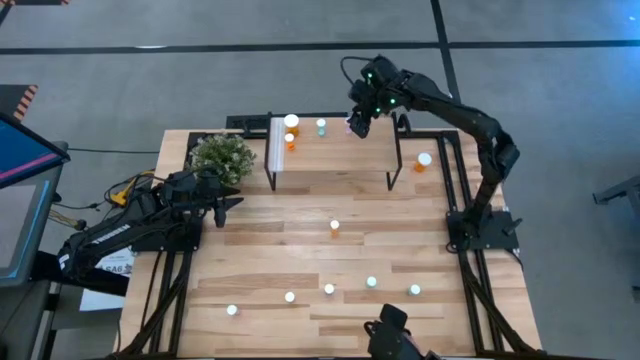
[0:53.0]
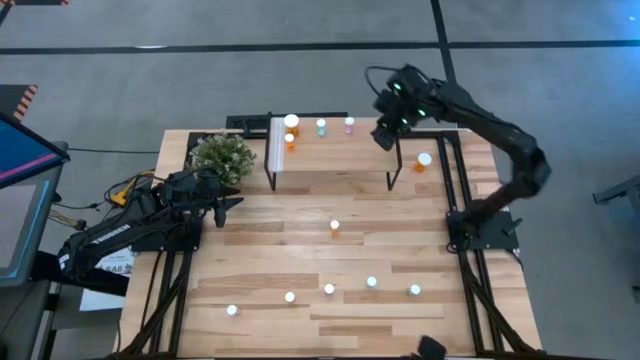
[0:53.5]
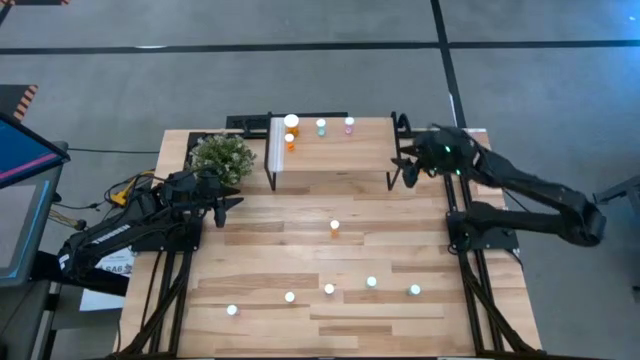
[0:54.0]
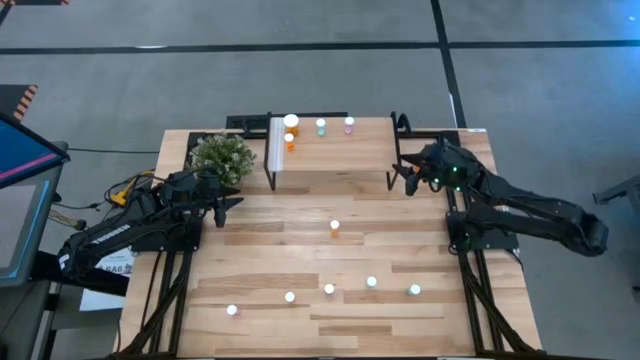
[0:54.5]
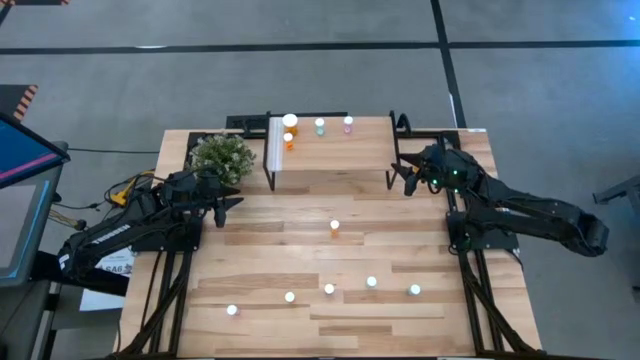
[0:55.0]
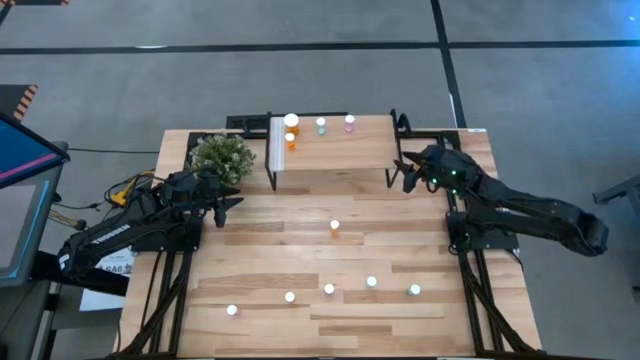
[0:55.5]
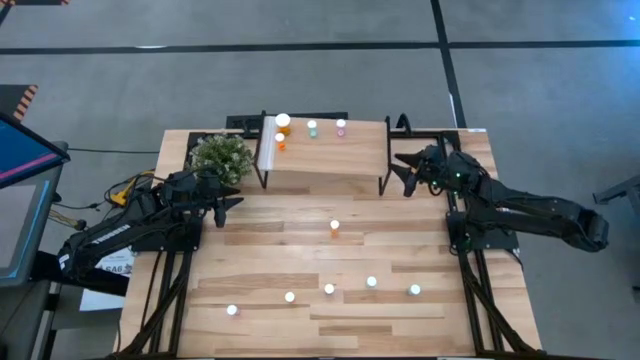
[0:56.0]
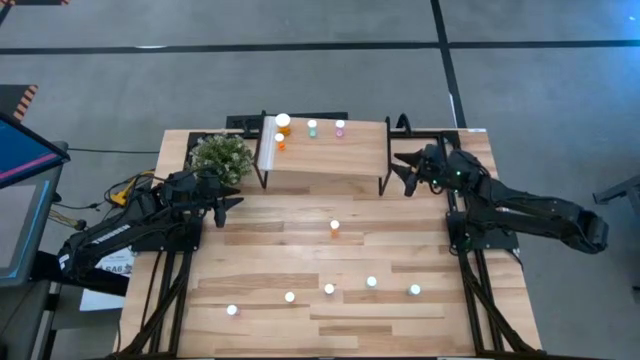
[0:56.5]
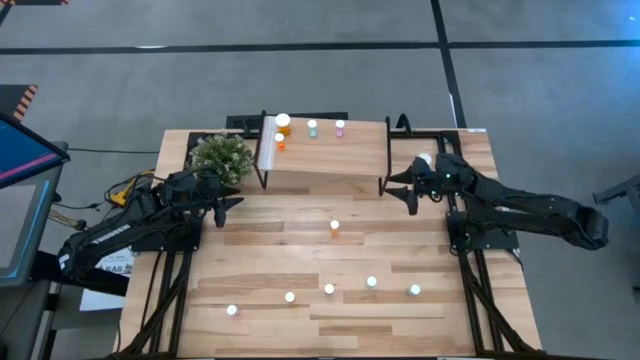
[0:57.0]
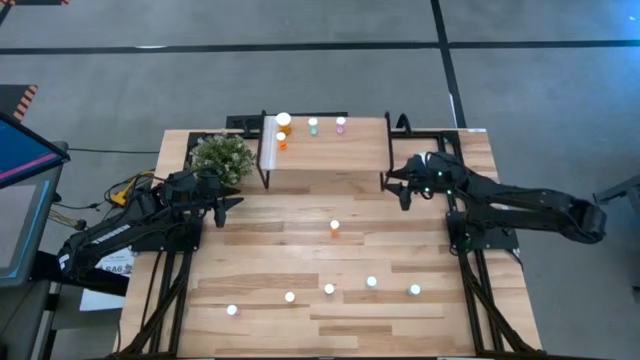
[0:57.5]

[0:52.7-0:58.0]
Task: Pick and place medicine bottles onto shelf by color
Adjust the shelf

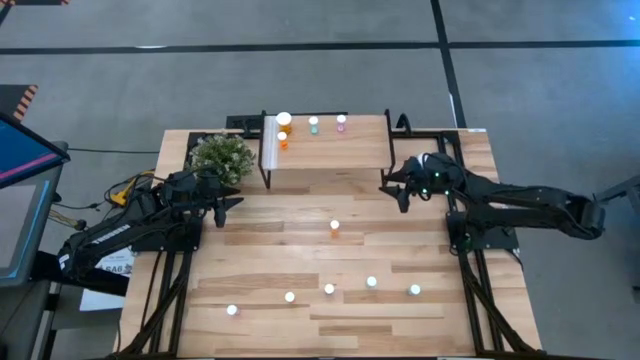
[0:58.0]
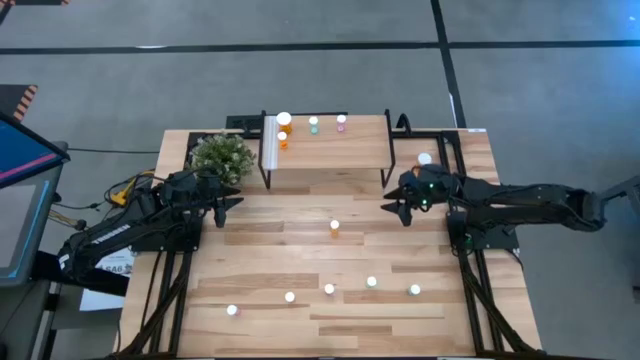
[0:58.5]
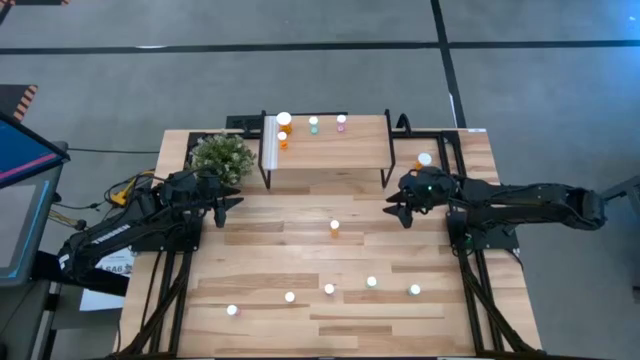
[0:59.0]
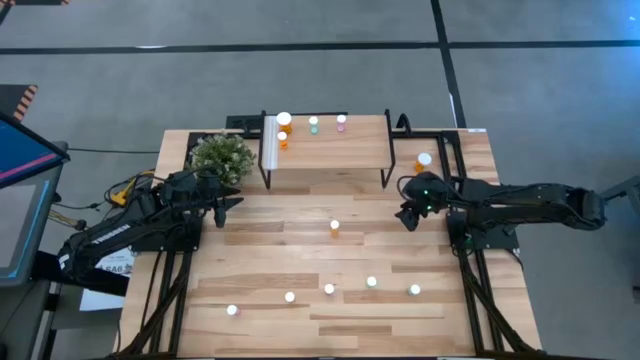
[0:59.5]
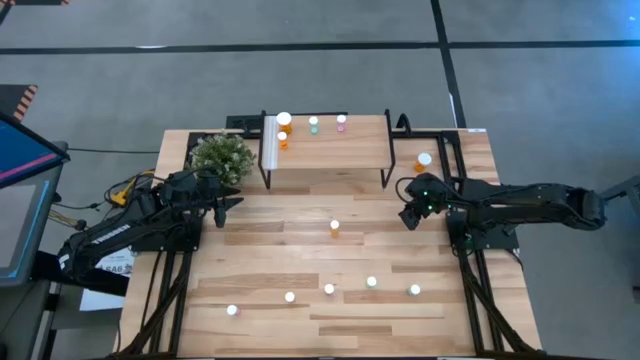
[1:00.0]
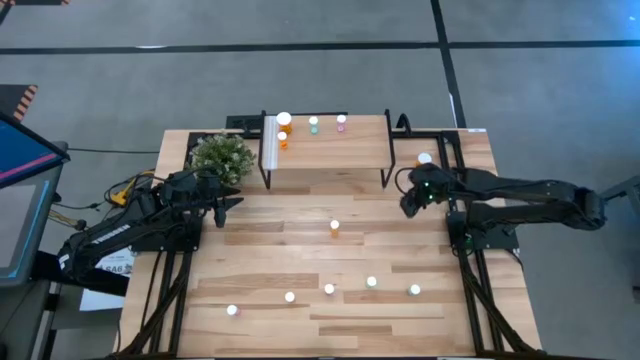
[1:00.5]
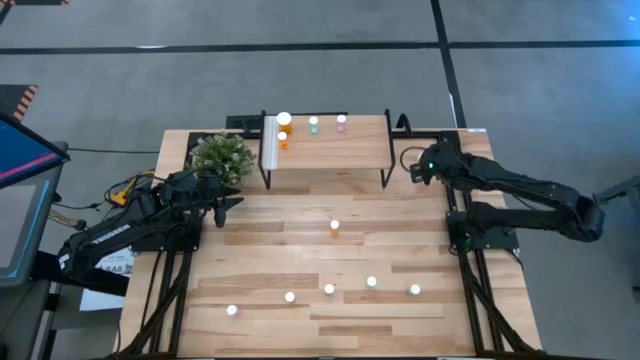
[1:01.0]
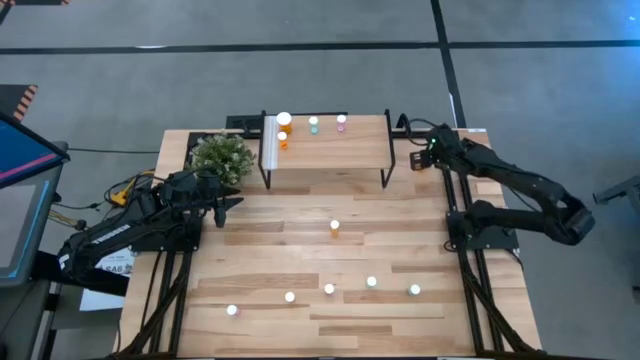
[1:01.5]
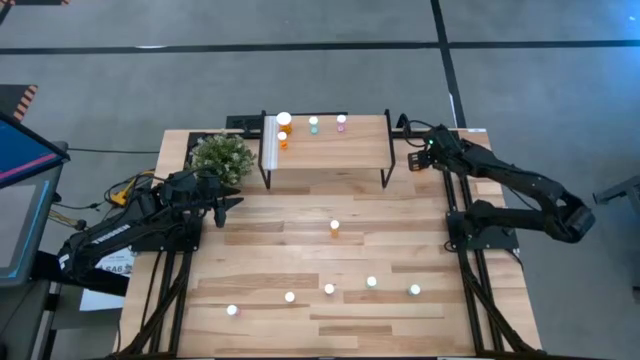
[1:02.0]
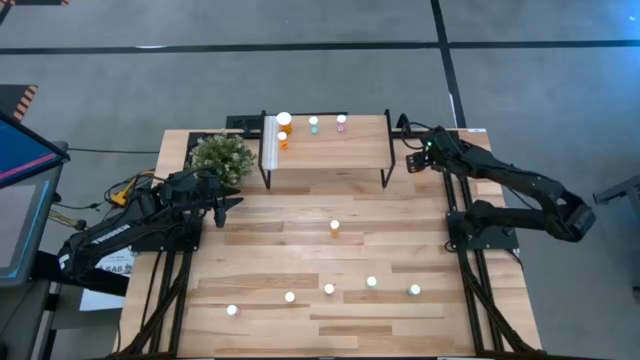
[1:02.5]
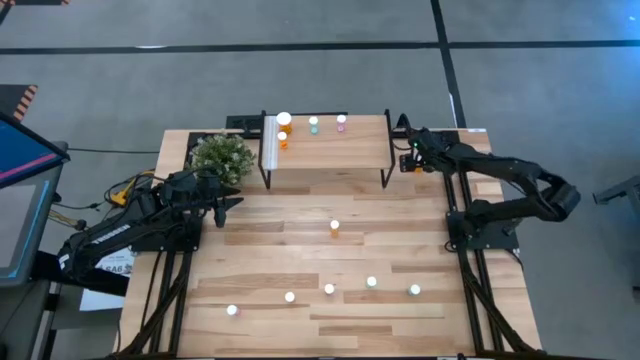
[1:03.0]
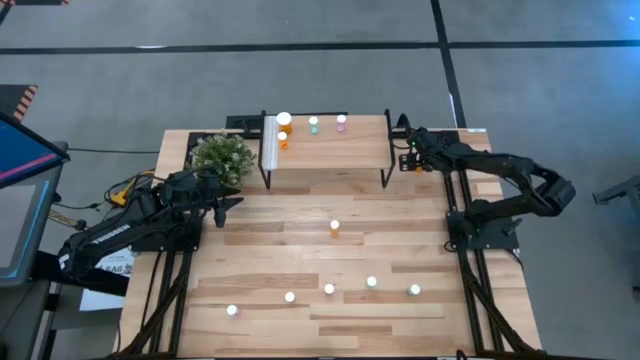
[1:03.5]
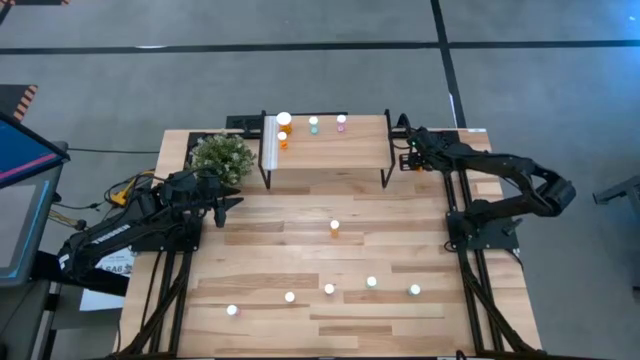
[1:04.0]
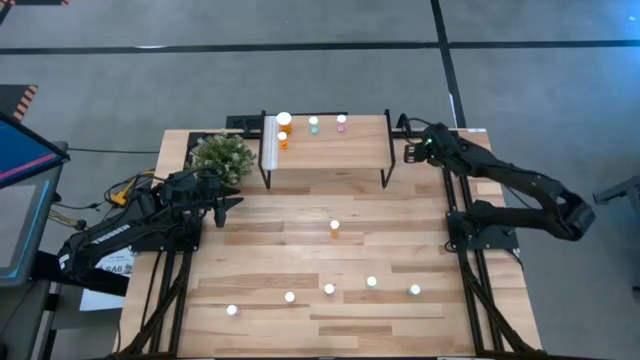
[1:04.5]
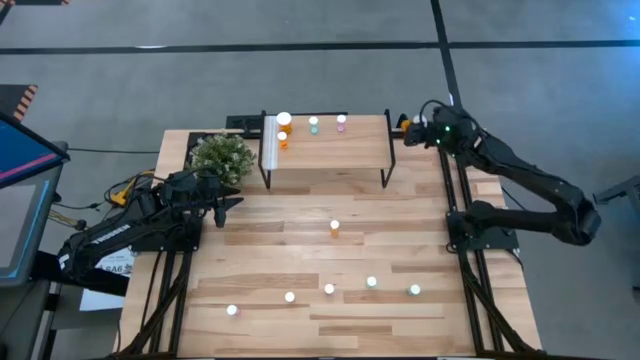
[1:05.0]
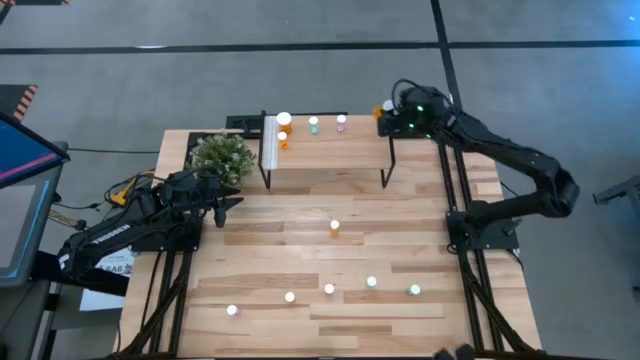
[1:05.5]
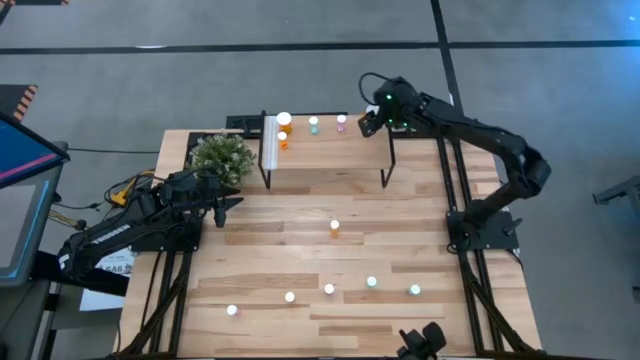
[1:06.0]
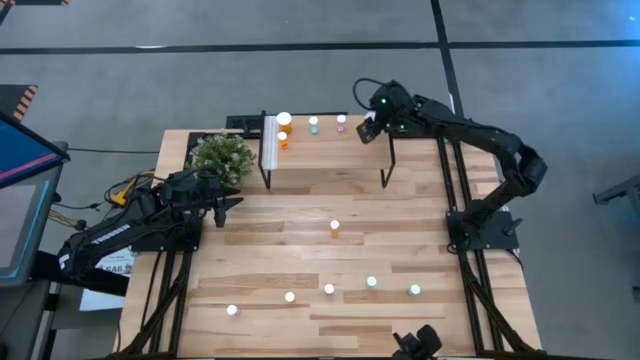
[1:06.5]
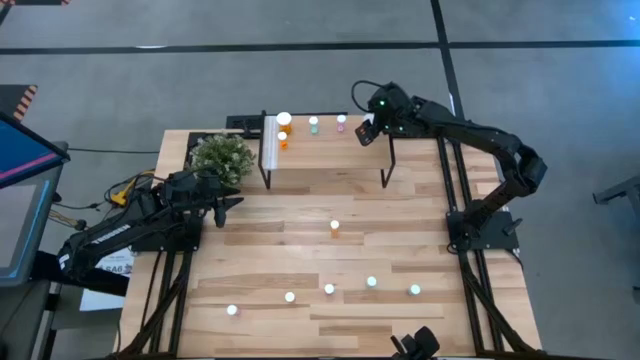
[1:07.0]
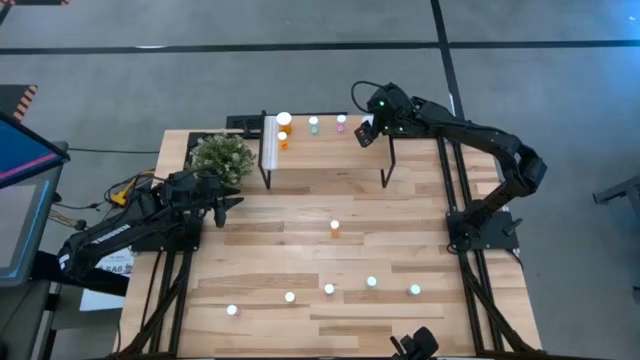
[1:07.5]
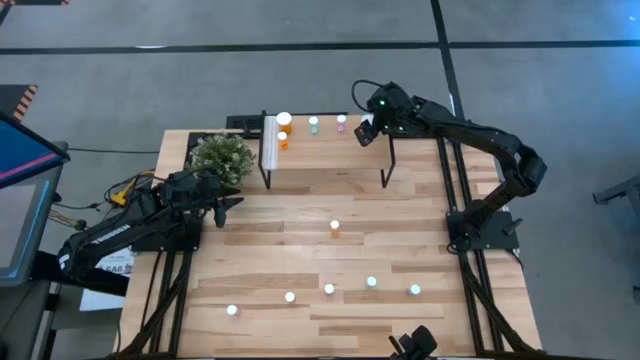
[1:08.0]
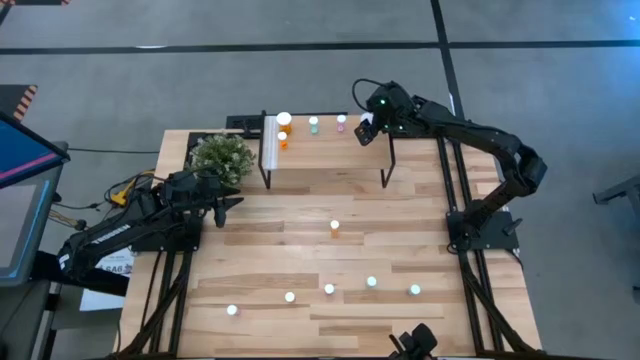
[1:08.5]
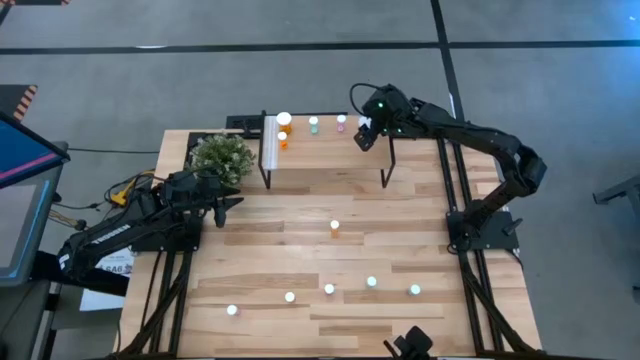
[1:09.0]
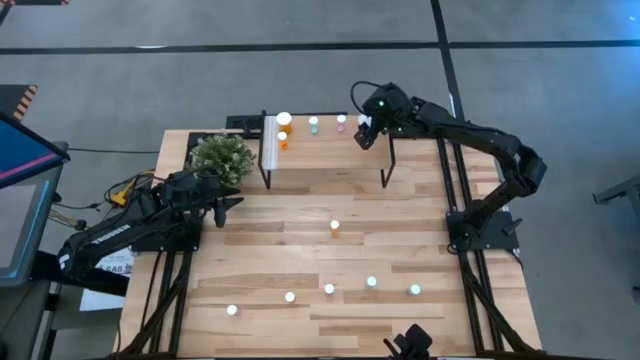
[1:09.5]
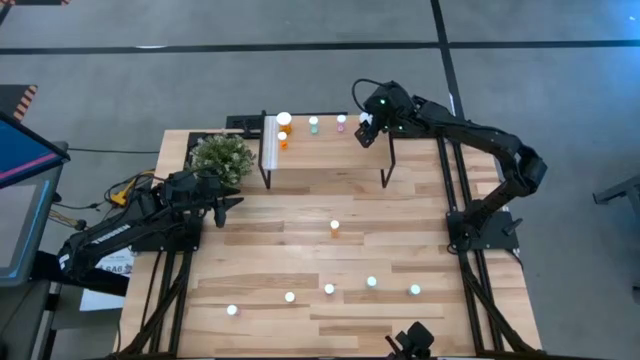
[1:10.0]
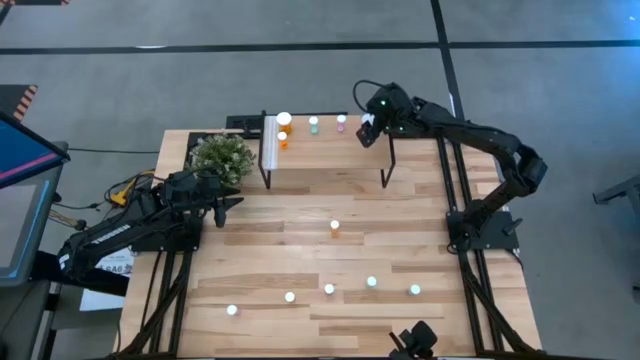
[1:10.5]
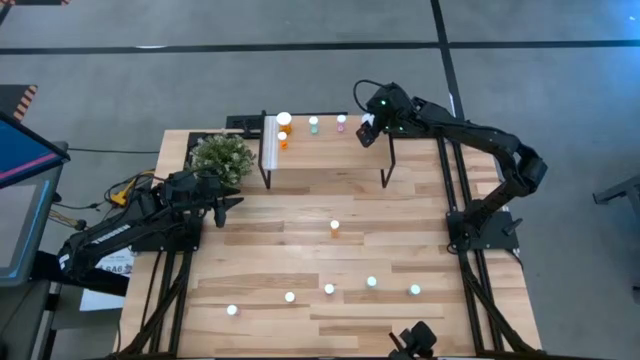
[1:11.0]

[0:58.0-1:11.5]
Put the big orange pill bottle on the shelf

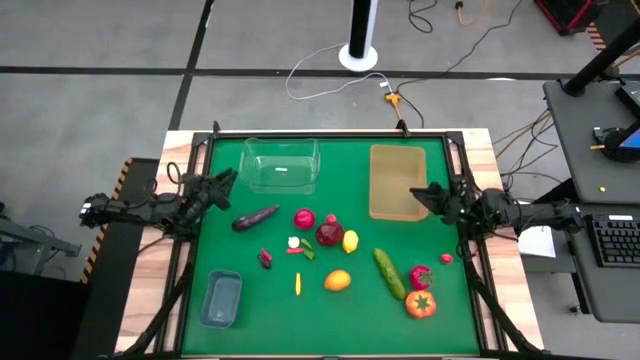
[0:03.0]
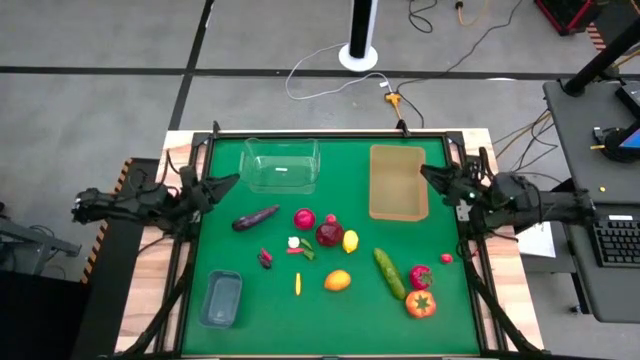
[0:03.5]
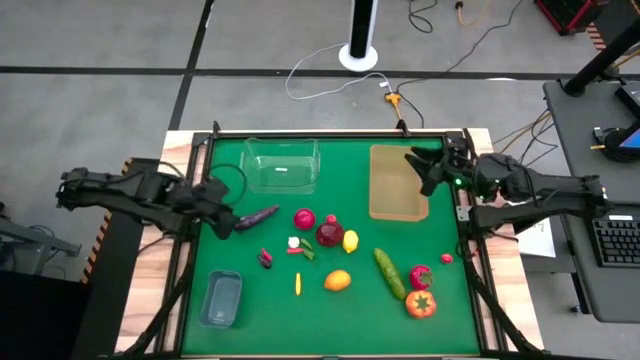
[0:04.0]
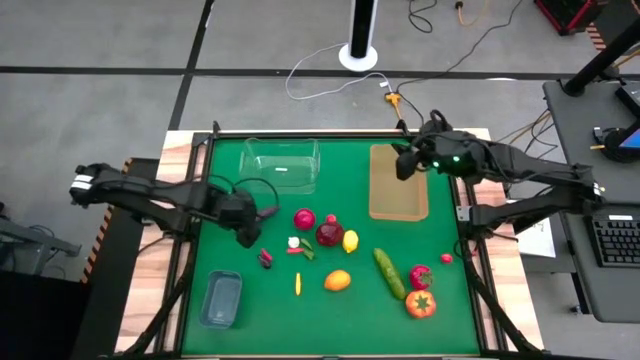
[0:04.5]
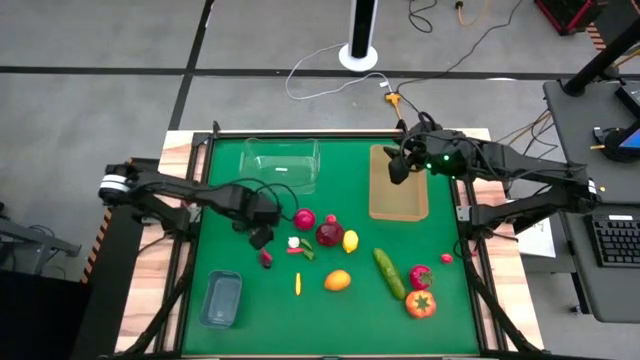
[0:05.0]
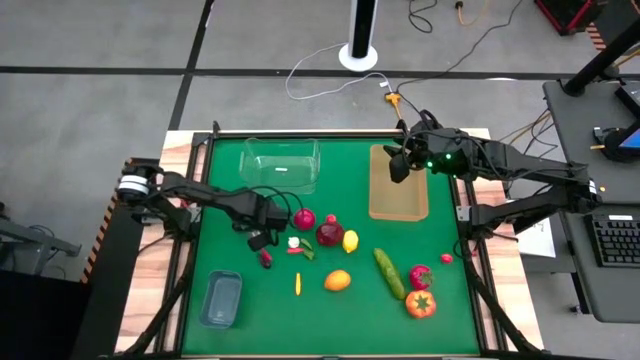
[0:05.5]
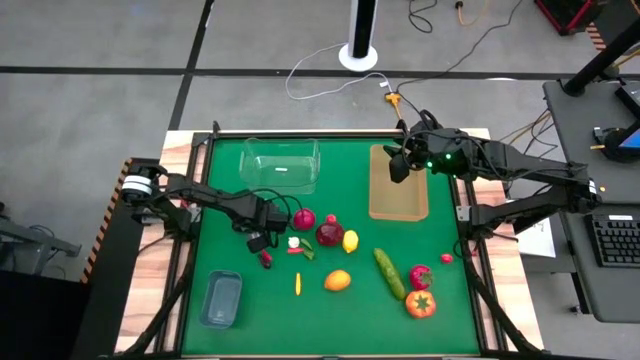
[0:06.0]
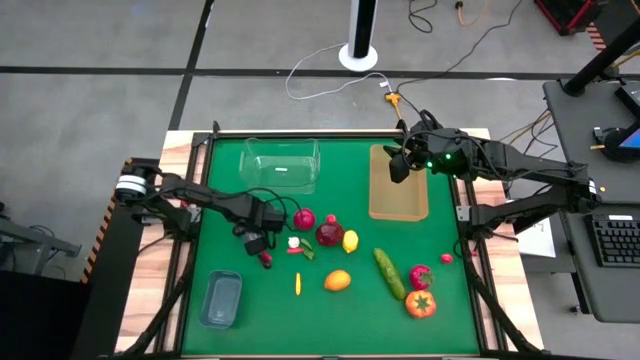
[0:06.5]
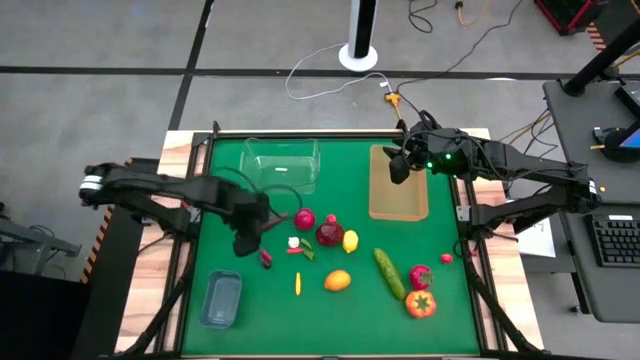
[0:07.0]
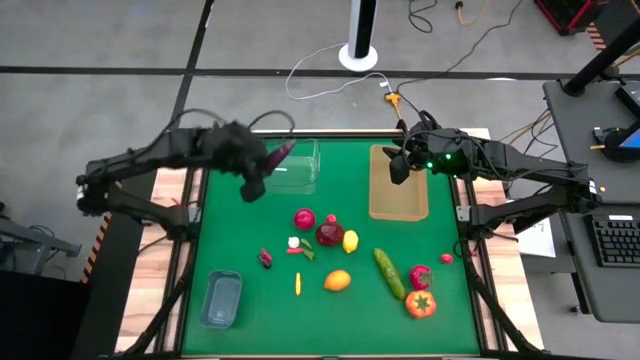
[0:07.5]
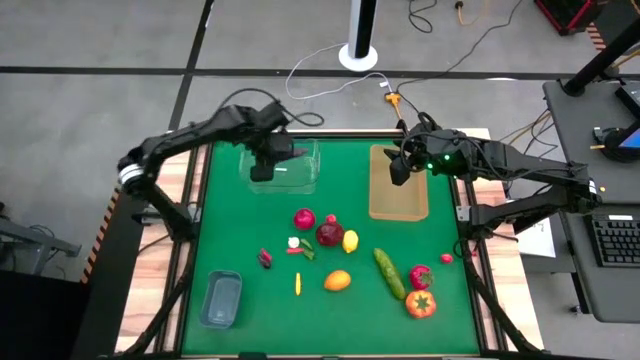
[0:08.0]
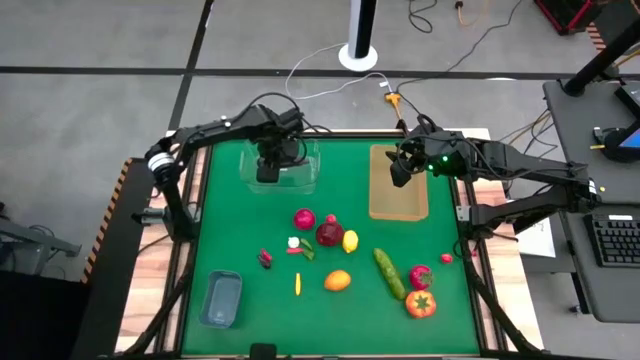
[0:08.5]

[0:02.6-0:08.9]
Task: Sort produce into baskets
Put the top large purple eggplant into the transparent bin
